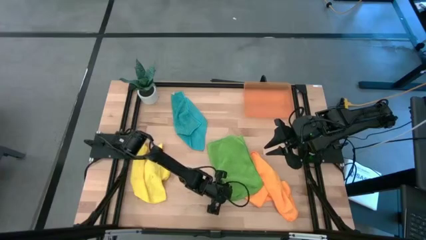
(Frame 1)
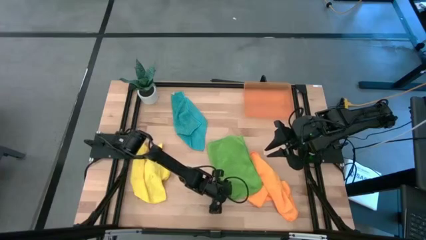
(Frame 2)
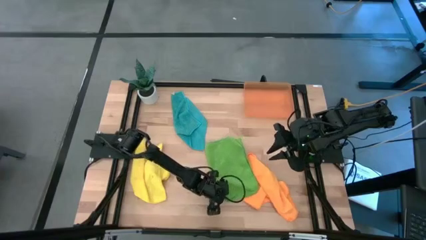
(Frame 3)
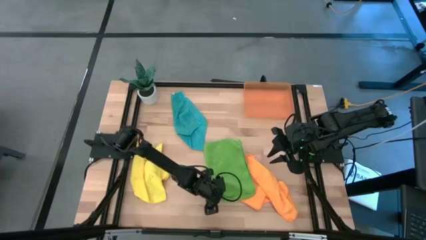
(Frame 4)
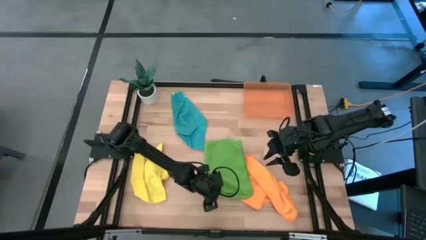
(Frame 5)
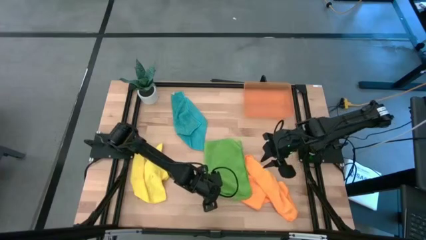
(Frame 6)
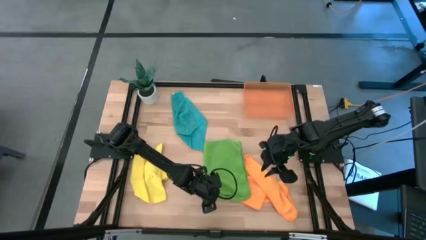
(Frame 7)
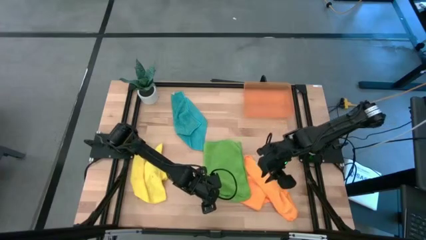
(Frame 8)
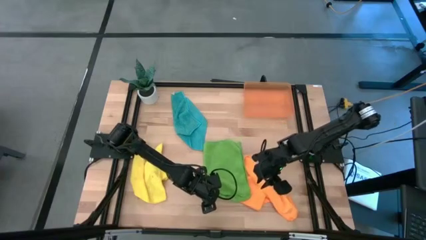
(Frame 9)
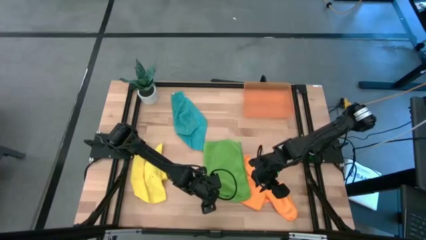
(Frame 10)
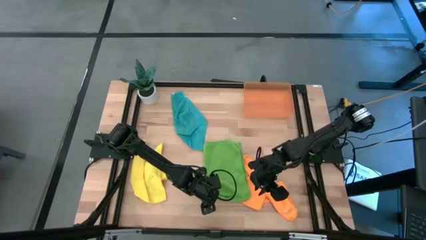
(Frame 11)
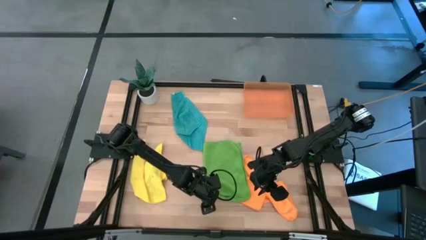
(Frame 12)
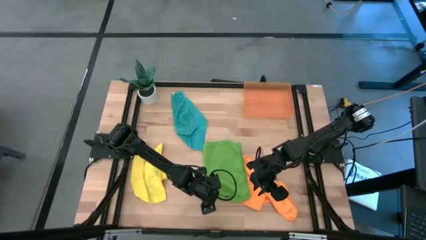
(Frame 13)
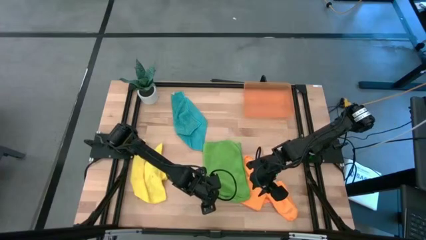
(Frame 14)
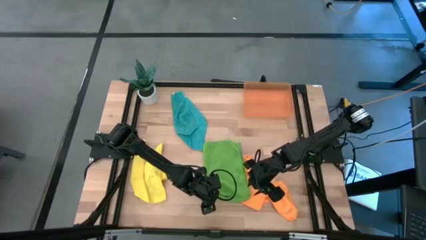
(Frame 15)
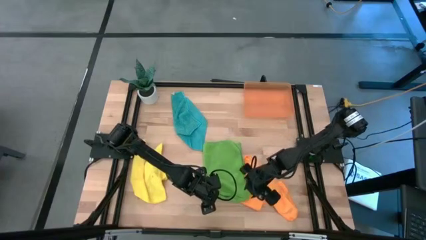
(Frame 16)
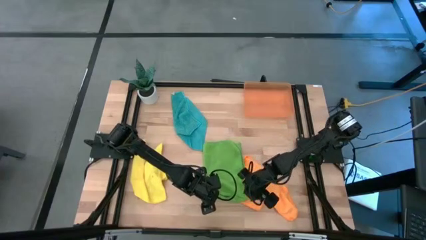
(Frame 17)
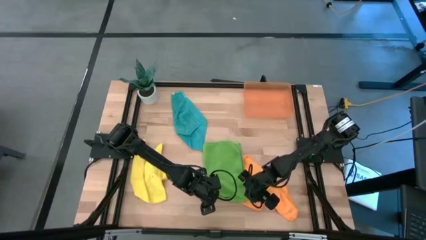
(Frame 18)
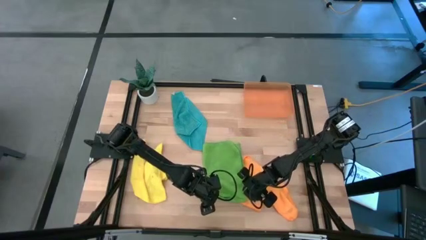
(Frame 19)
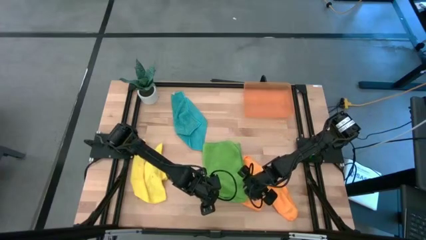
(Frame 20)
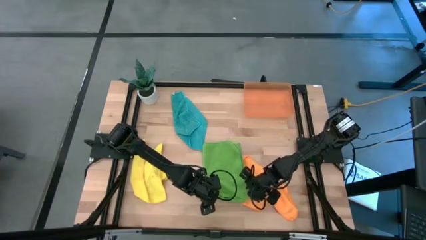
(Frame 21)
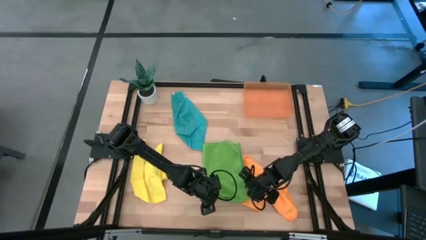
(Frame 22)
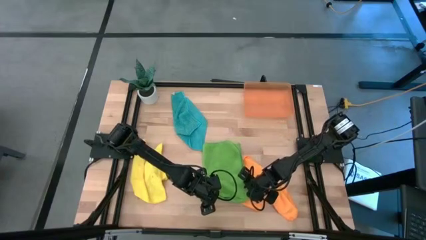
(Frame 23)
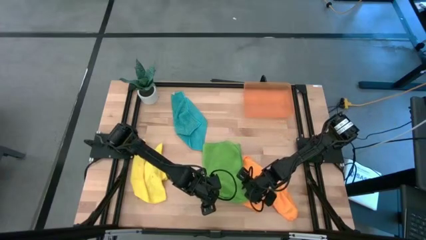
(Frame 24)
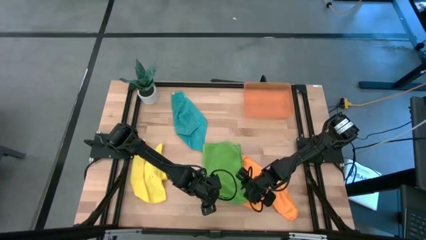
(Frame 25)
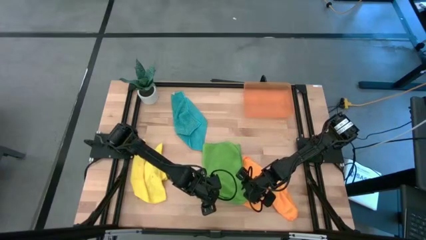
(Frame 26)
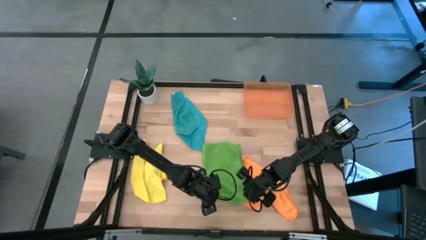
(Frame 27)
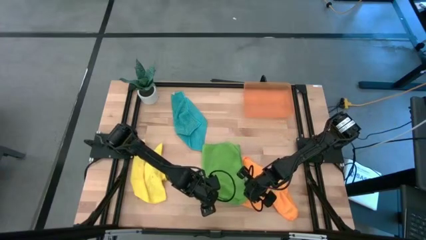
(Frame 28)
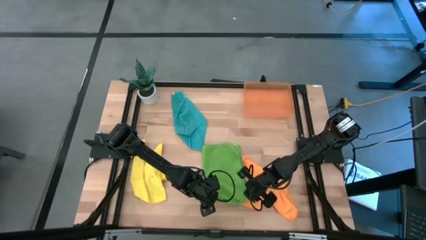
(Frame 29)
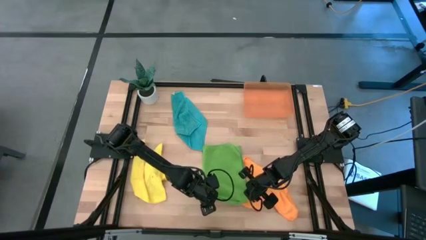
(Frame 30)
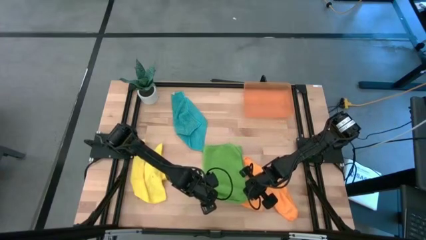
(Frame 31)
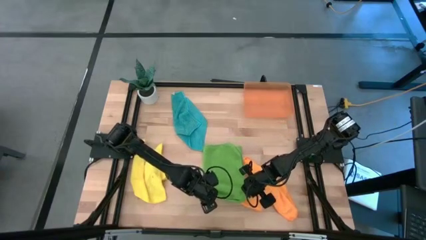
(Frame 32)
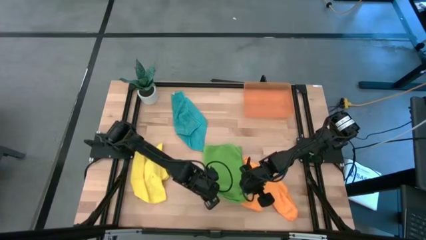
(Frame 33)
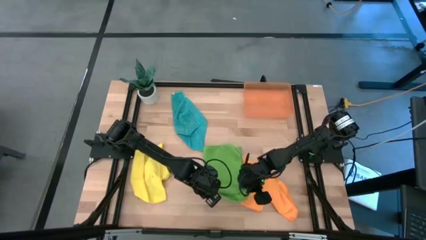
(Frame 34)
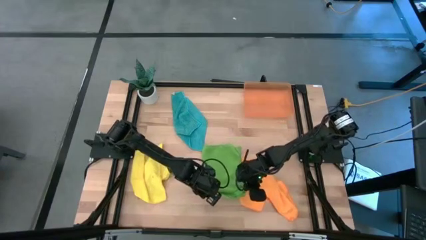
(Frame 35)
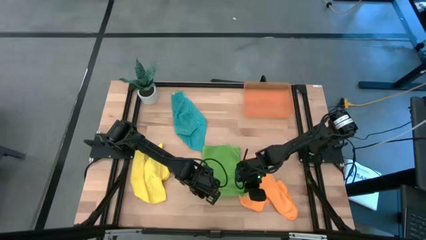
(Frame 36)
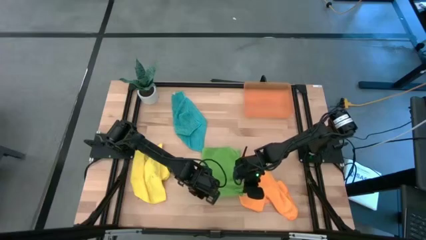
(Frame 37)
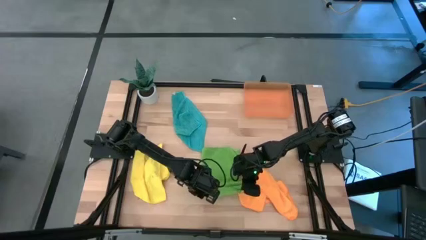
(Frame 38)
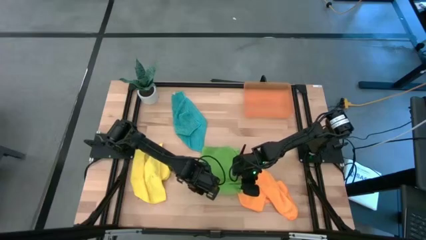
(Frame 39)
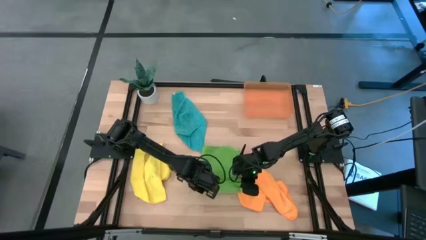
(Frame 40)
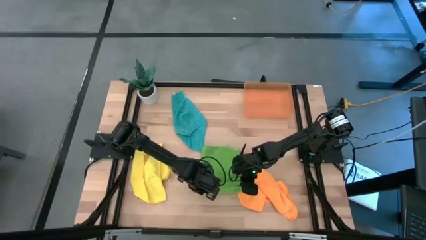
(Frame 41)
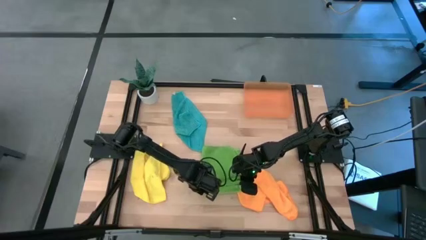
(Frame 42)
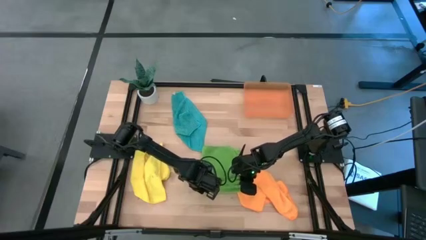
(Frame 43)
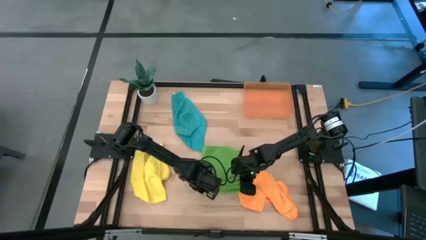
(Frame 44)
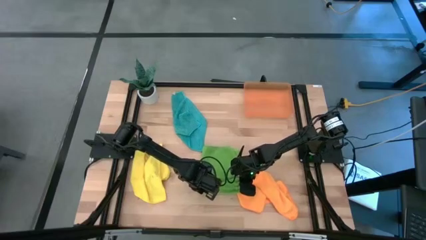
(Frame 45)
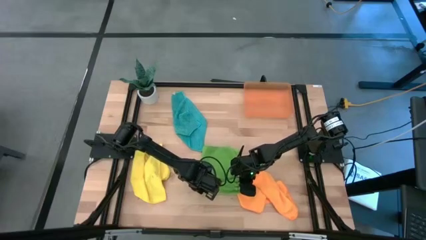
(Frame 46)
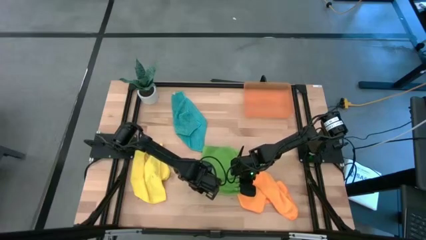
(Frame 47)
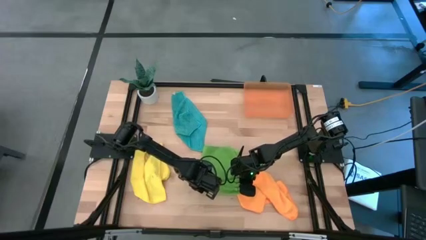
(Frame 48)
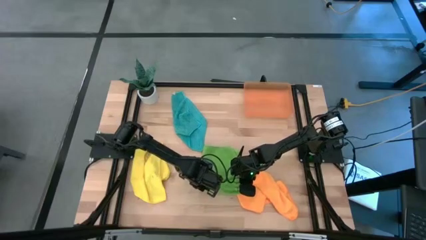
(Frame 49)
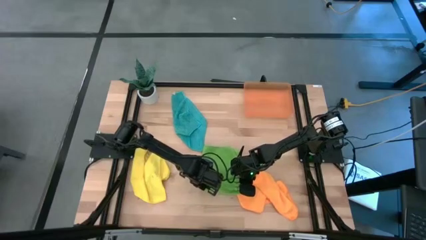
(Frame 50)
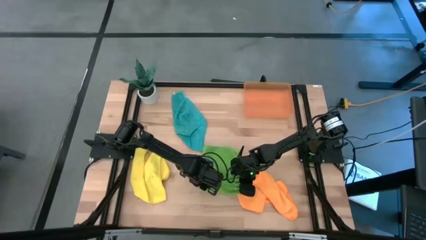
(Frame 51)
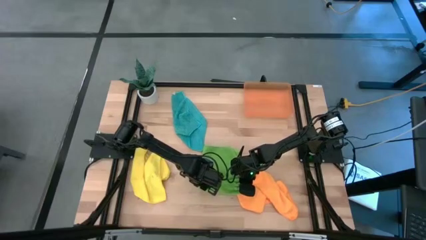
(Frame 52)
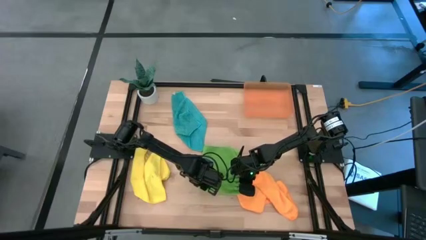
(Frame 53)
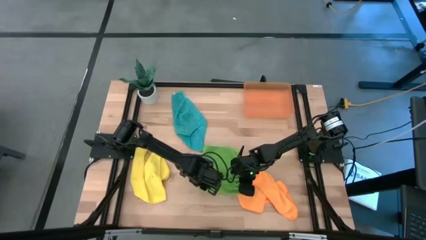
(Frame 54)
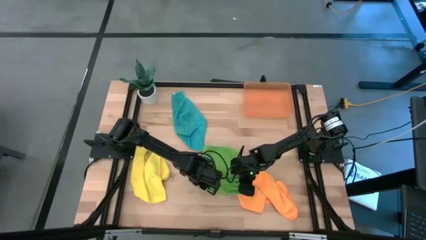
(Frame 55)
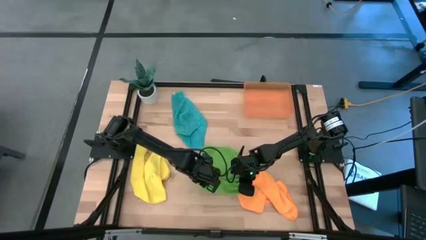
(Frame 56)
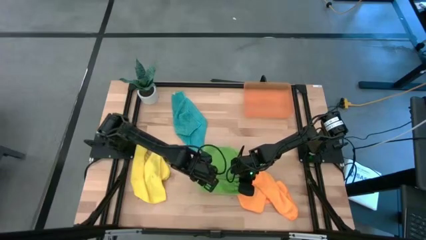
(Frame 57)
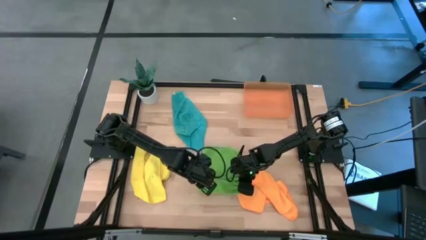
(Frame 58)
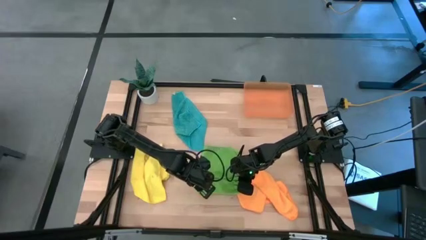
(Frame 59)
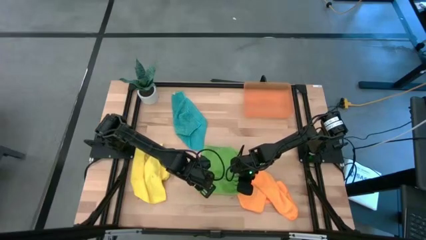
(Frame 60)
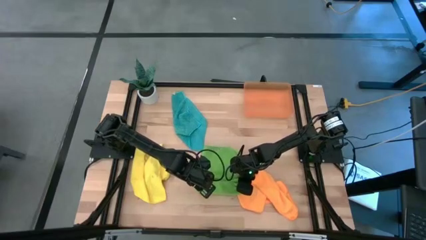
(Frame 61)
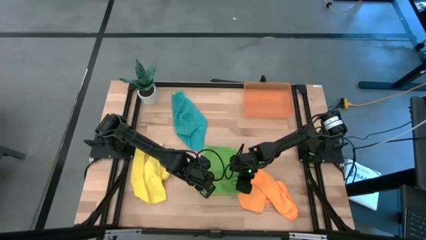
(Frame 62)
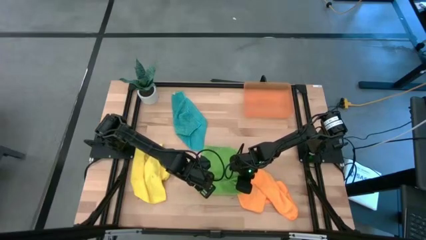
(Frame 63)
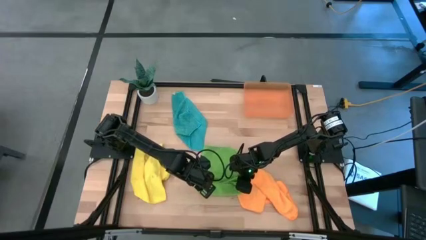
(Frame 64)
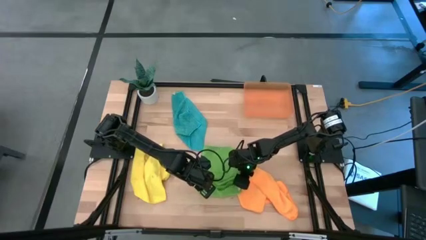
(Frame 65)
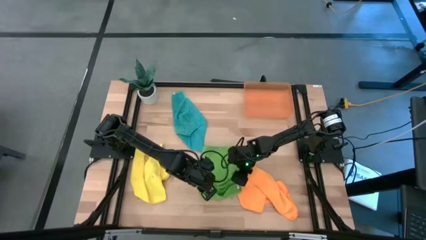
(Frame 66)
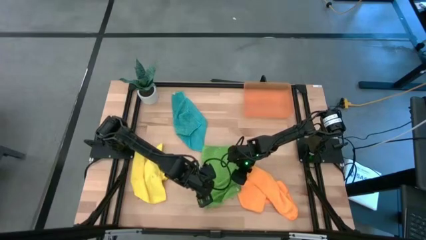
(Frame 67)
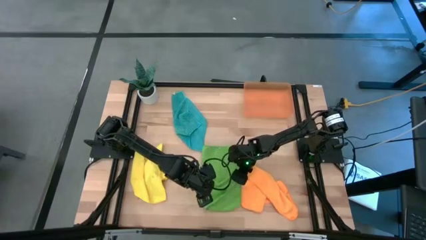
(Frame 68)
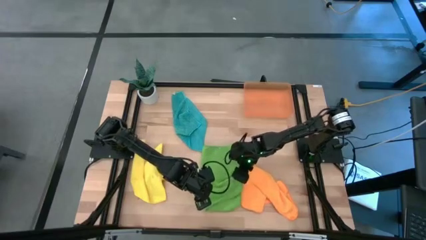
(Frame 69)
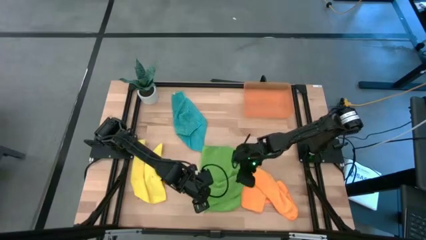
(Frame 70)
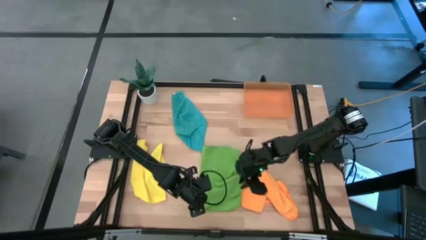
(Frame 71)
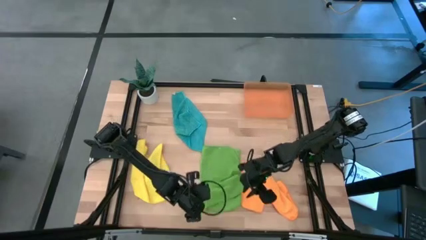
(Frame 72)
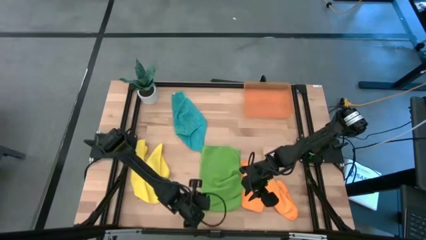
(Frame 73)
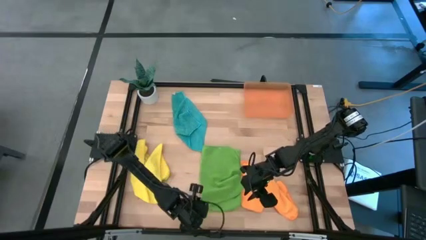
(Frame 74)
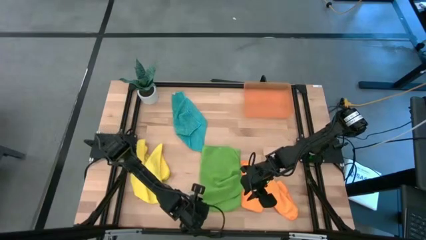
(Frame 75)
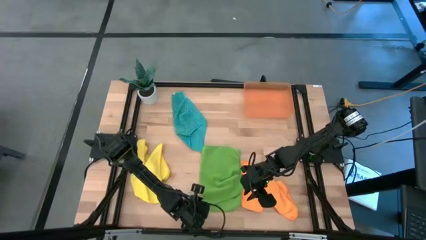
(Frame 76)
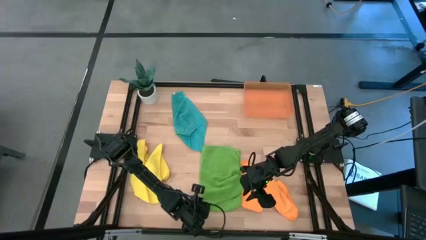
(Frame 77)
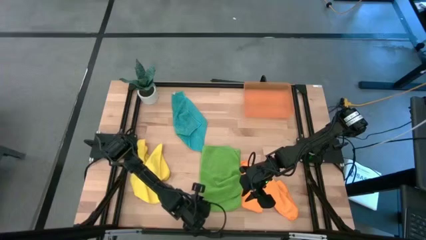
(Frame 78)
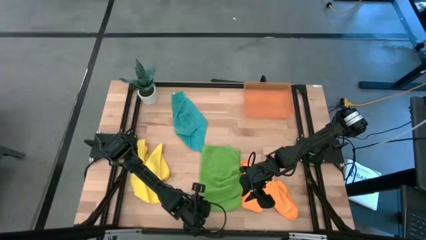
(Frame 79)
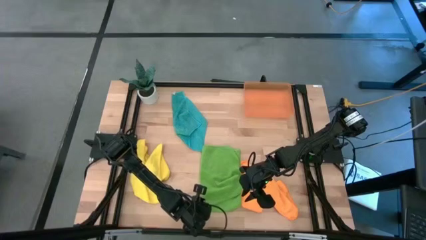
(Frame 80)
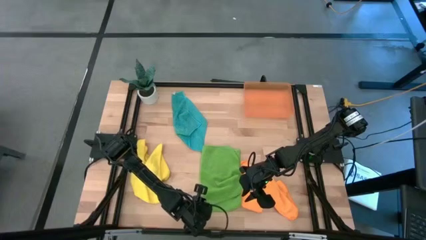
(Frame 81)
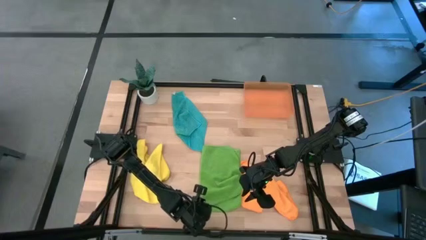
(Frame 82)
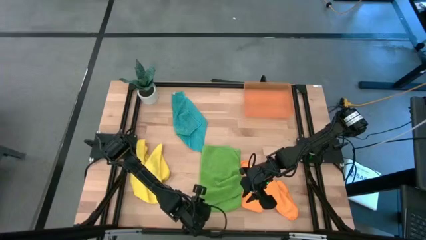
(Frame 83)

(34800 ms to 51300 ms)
Task: Roll microfiber towels into tight, uniform cylinder then place into a basket
Fold the green towel
